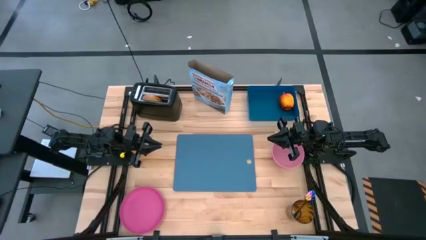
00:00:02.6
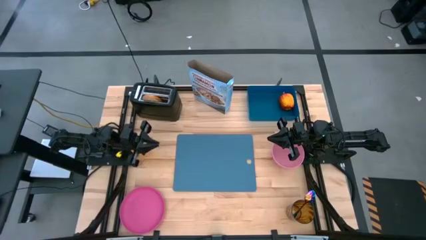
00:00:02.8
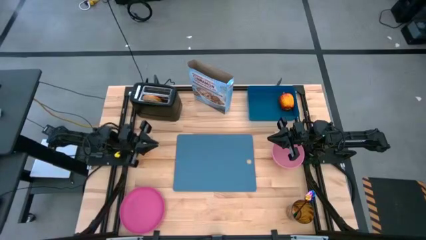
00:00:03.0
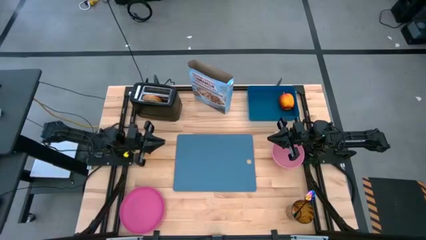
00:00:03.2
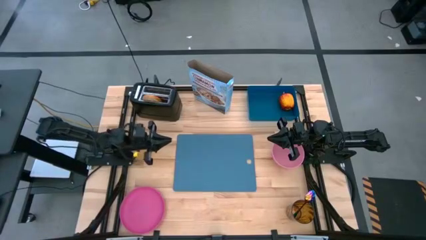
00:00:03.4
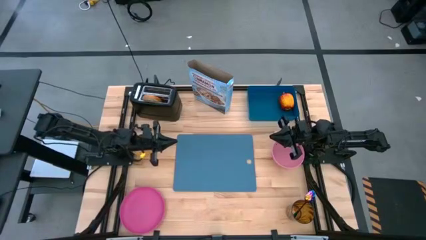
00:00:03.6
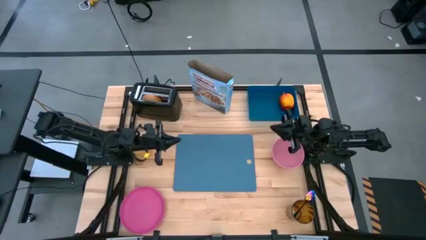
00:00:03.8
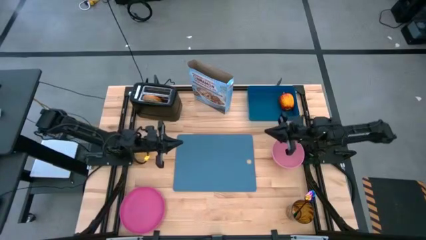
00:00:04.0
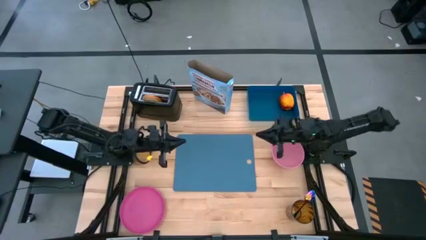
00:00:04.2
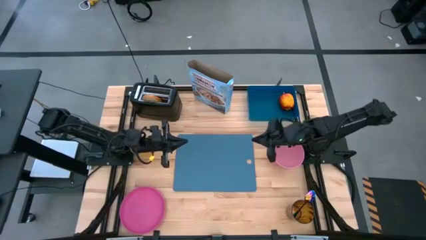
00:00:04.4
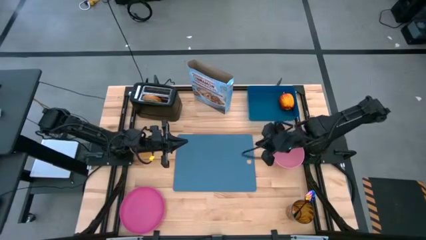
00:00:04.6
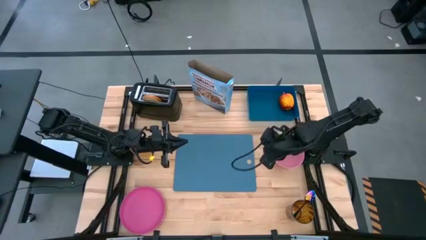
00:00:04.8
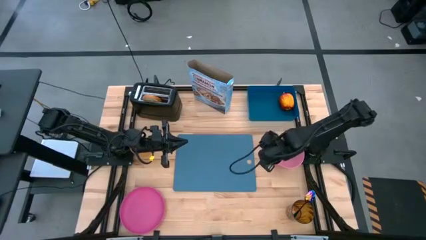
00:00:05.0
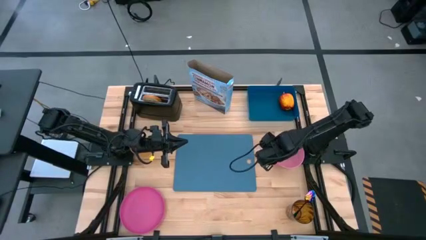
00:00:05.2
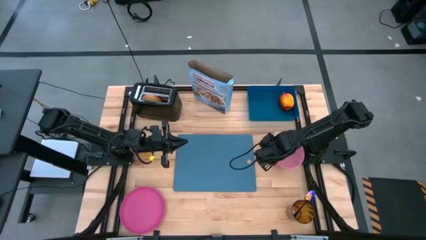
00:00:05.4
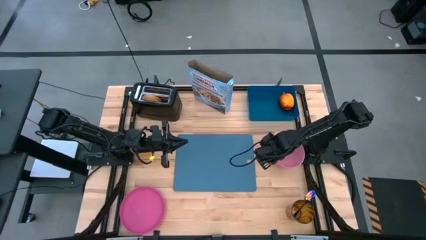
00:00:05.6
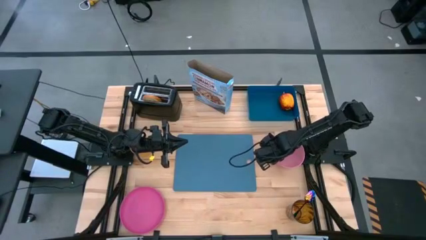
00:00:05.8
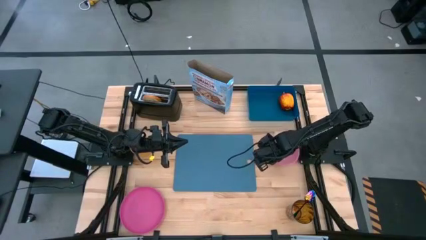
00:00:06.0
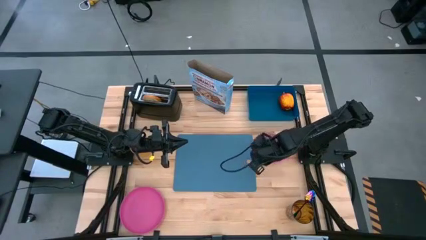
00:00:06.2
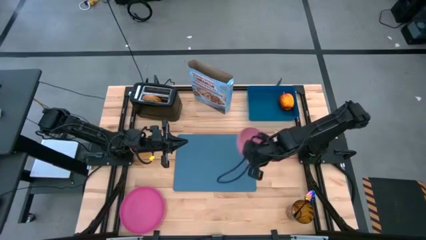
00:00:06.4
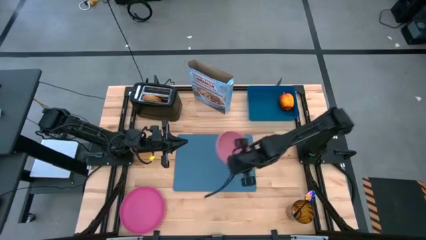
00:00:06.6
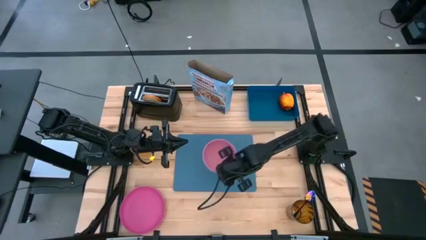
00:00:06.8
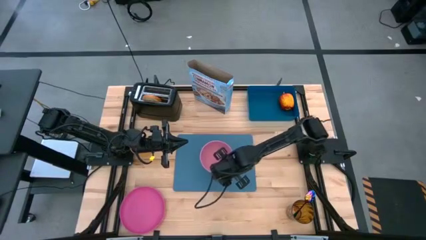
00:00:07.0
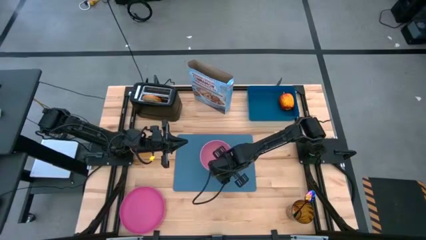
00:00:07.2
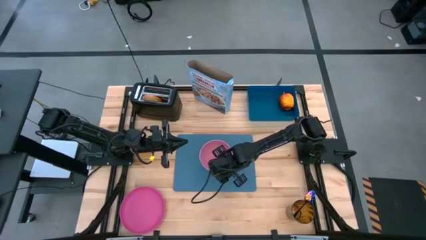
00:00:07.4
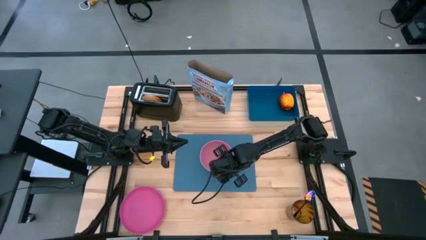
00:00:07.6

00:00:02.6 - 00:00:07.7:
Task: Arrange a breakfast setting
Put the pink bowl on the blue cutting board

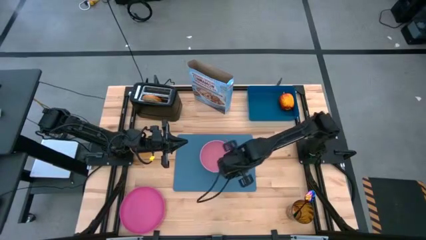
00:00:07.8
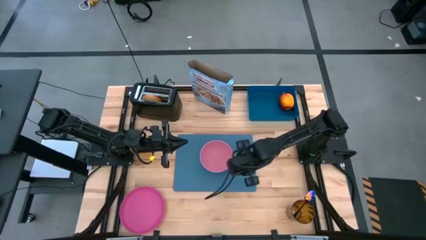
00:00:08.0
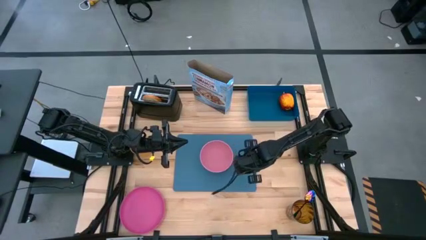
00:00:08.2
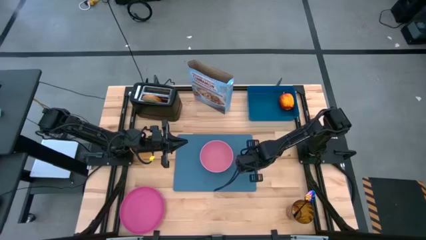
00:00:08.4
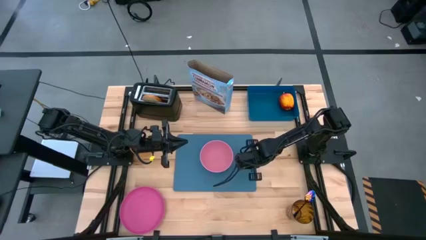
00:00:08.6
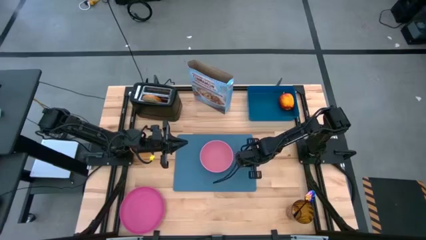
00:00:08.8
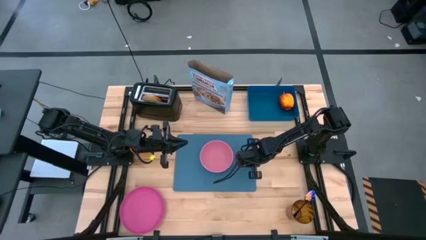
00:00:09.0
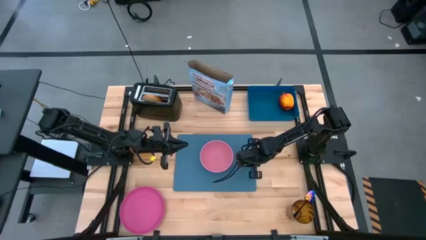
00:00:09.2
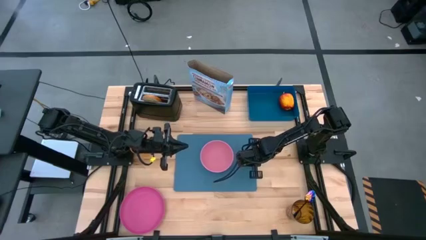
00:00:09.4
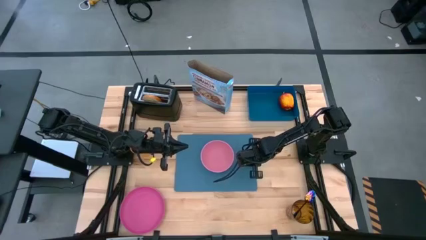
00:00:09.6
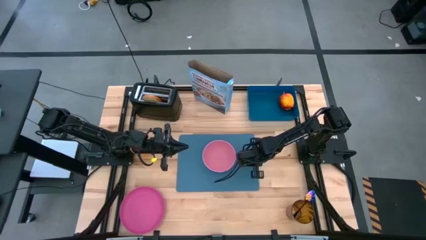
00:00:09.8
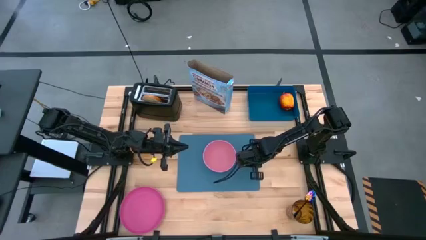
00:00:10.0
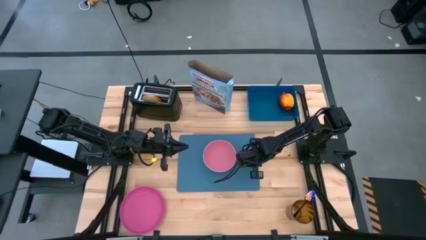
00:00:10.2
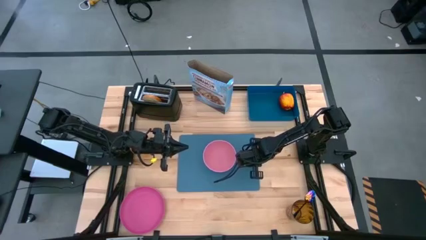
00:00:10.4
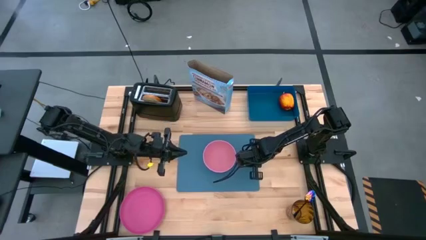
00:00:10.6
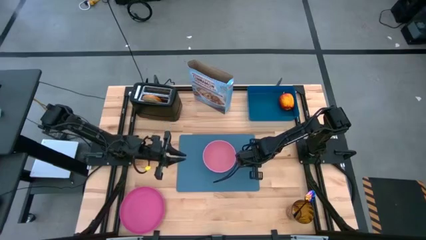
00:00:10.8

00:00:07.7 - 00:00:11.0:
Adjust the blue cutting board on the table

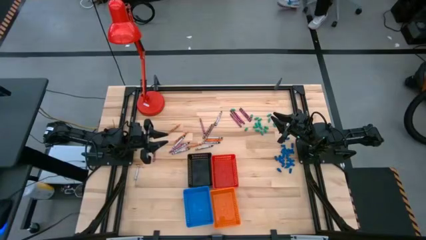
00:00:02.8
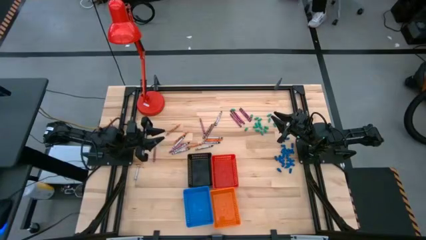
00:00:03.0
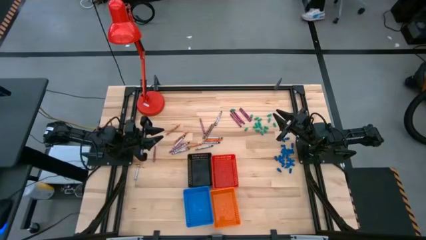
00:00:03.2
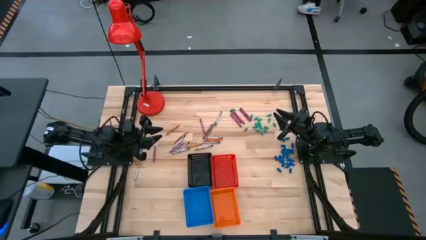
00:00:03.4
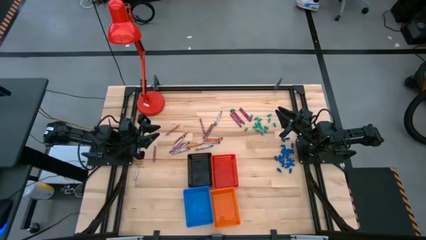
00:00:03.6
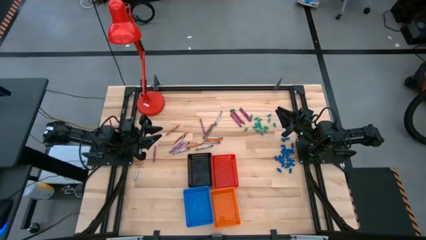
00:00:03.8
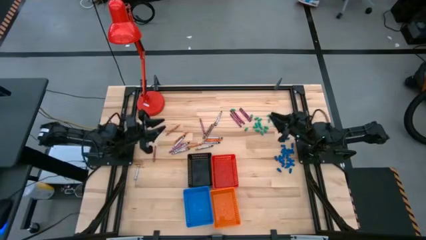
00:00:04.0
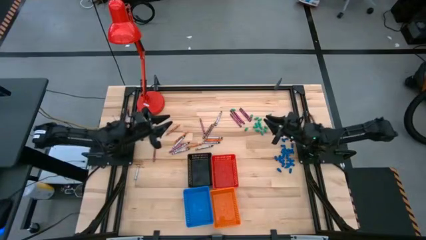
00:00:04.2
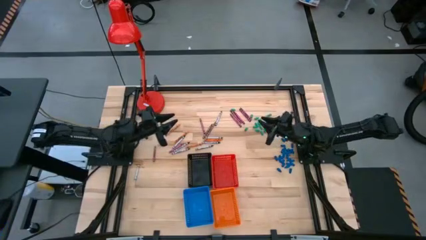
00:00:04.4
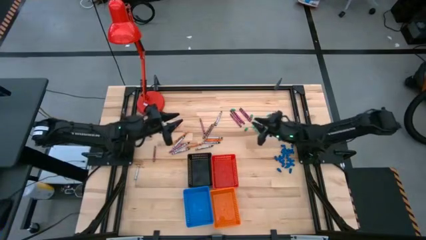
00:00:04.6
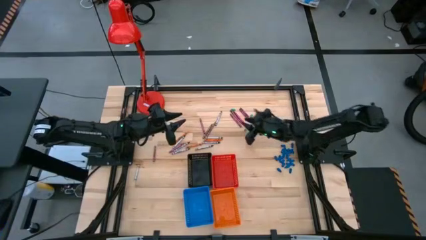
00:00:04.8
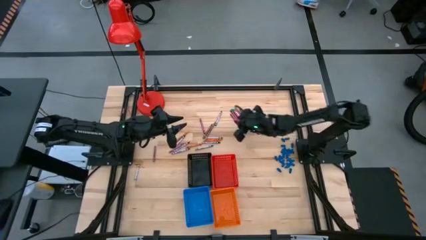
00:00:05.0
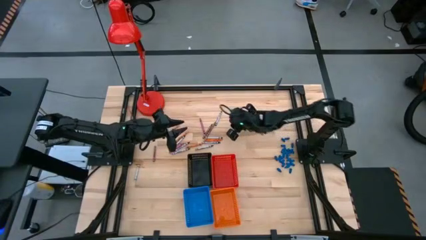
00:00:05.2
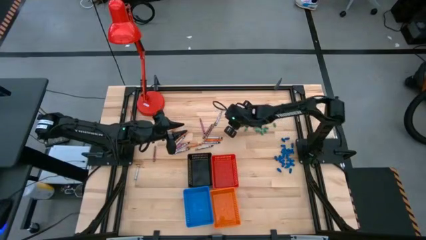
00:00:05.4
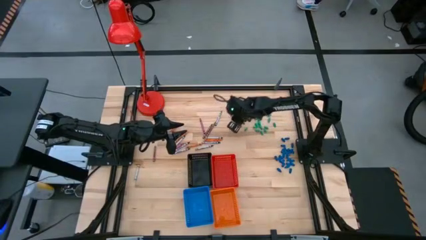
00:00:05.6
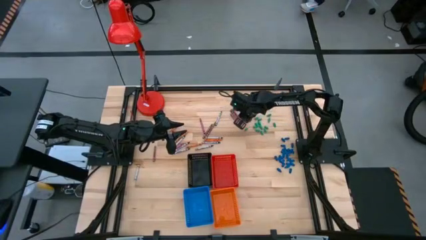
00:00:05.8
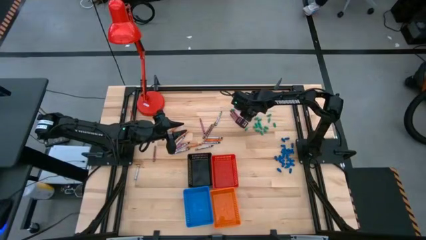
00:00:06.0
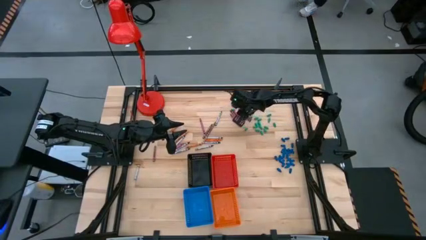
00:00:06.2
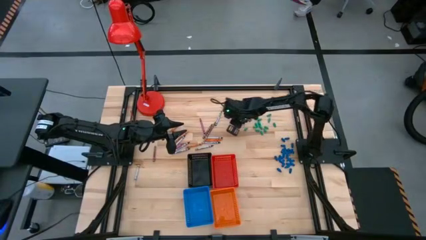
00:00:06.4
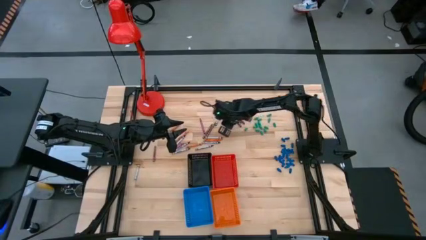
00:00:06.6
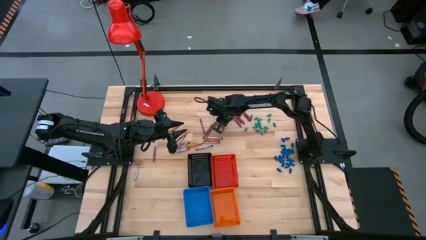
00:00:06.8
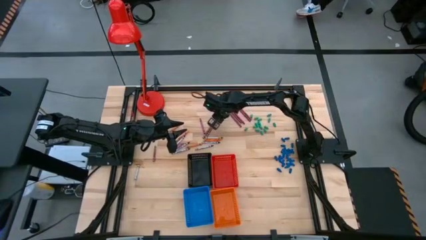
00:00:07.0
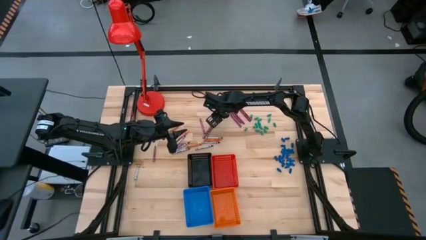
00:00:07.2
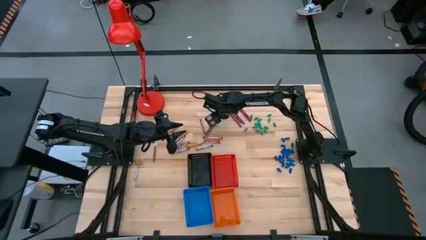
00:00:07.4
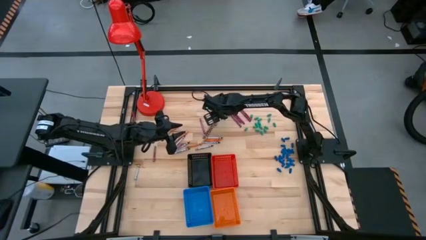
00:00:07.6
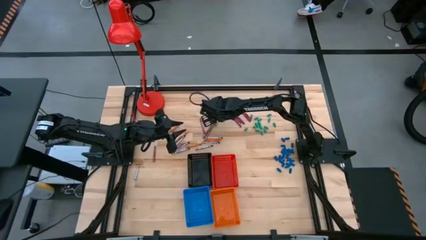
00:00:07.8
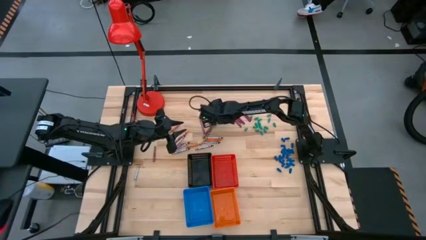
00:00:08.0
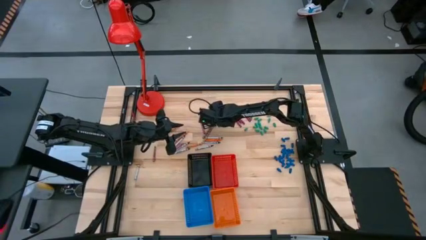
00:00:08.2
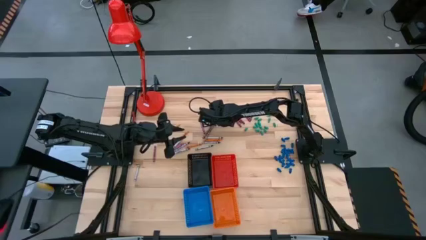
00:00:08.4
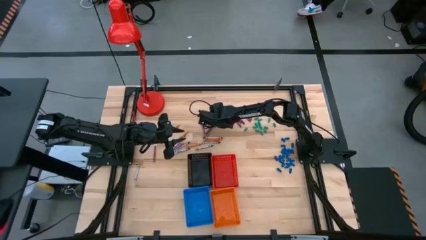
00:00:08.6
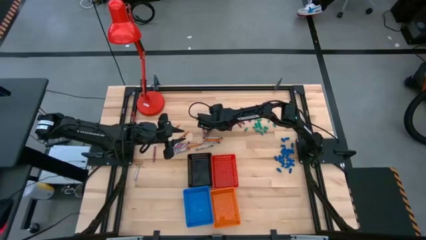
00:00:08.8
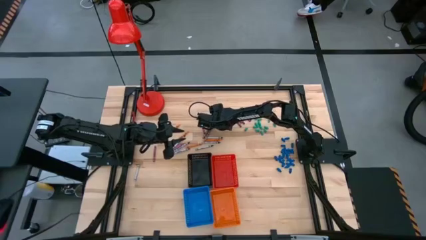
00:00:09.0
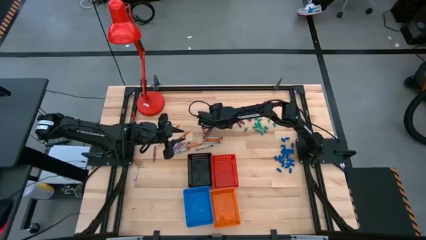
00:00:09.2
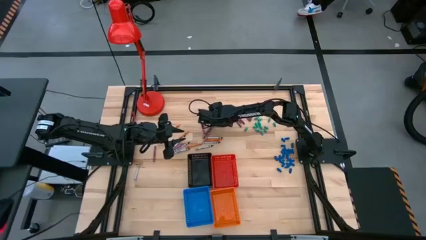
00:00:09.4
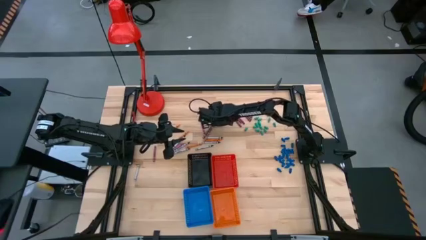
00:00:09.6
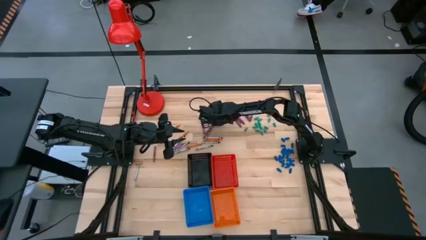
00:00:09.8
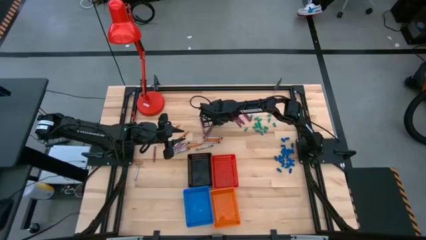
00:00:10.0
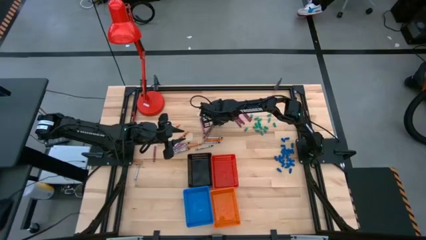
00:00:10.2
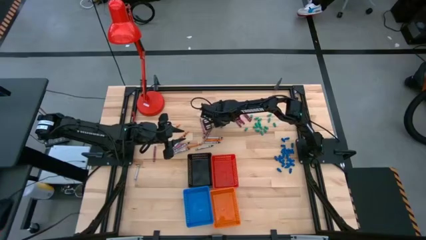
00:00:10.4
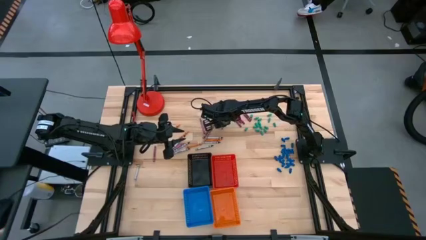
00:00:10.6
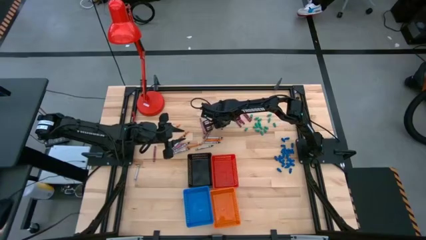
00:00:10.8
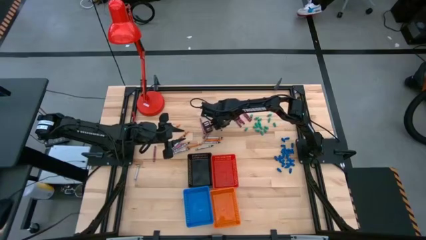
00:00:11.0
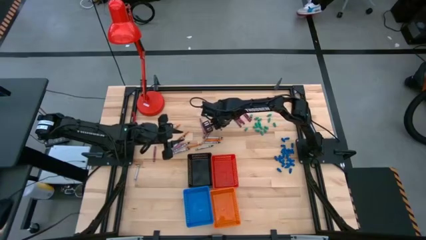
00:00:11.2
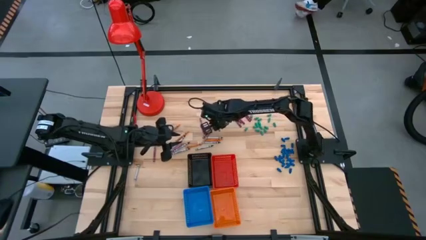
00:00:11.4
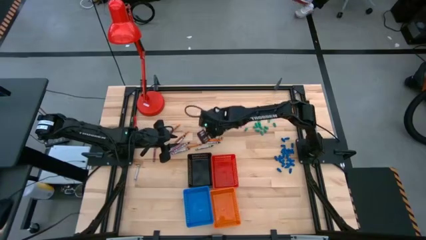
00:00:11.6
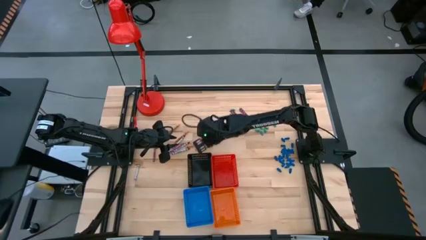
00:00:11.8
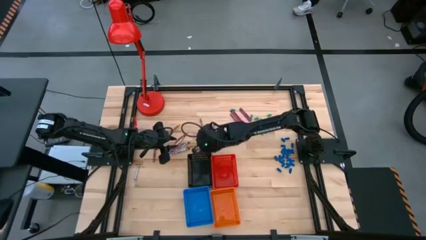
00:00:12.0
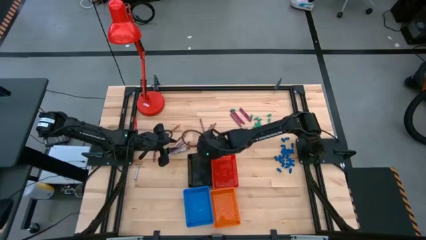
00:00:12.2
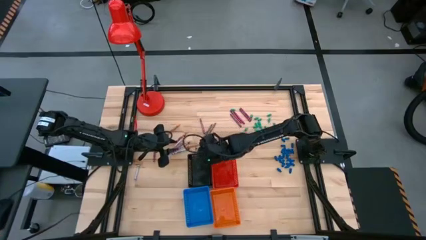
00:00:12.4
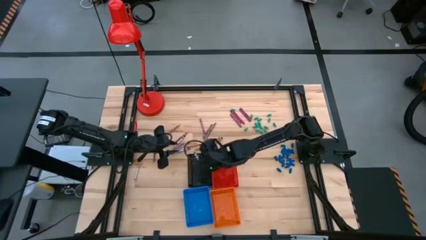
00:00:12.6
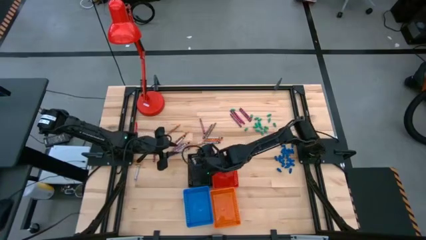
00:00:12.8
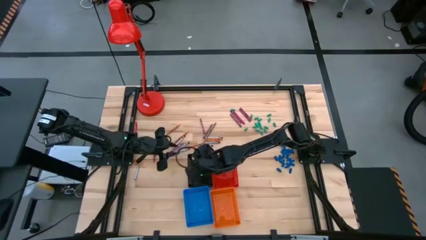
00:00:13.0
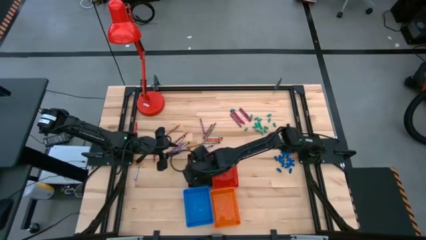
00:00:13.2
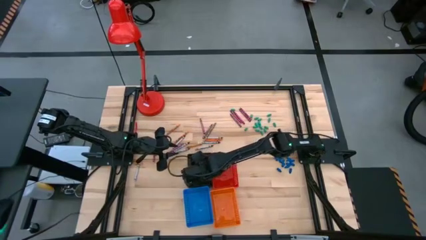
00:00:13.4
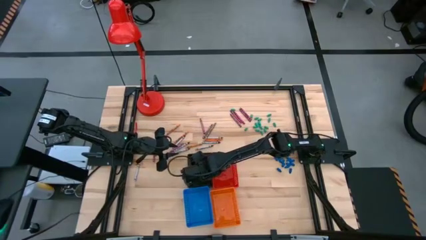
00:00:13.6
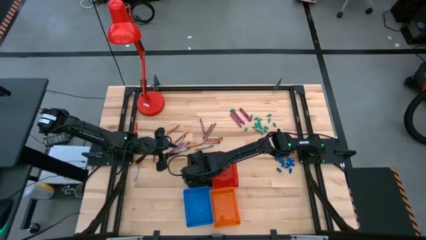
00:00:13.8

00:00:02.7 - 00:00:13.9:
Task: Sort crayons
Put the black crayon into the black basket
